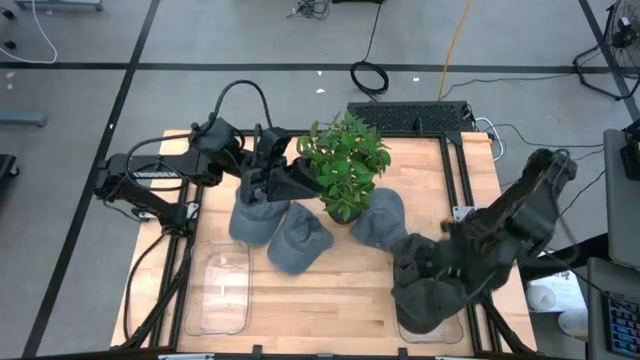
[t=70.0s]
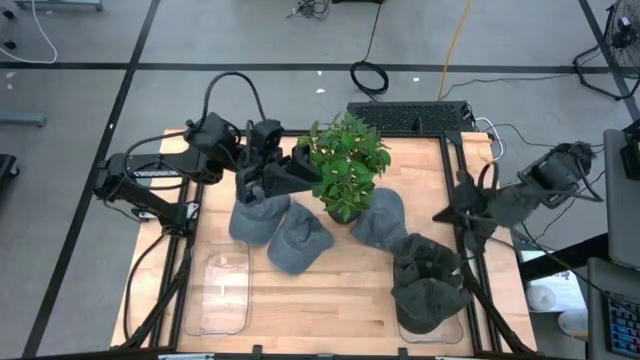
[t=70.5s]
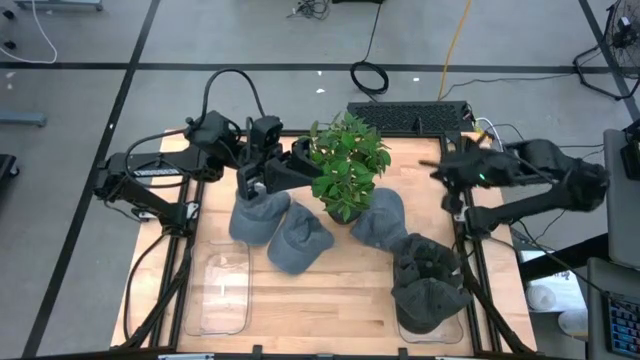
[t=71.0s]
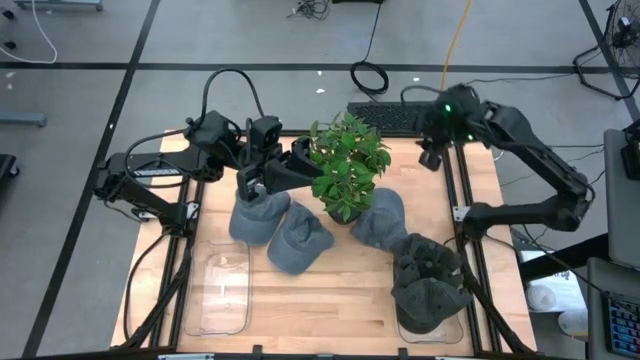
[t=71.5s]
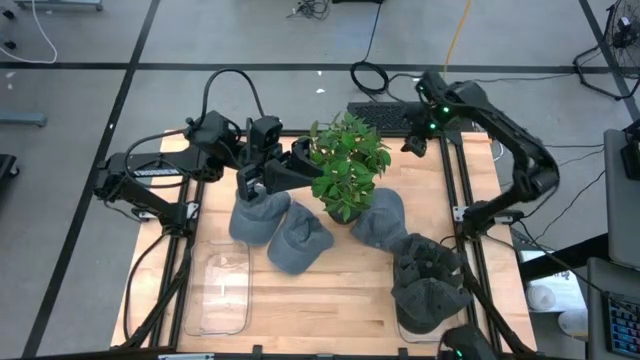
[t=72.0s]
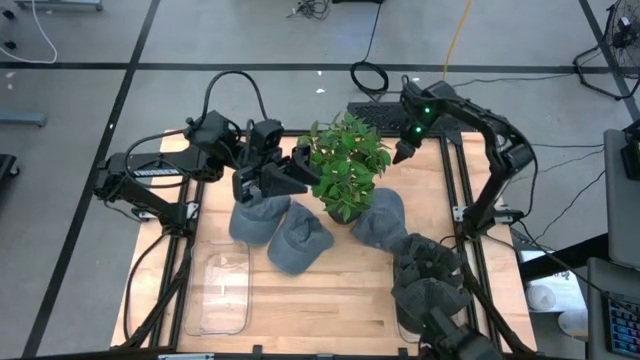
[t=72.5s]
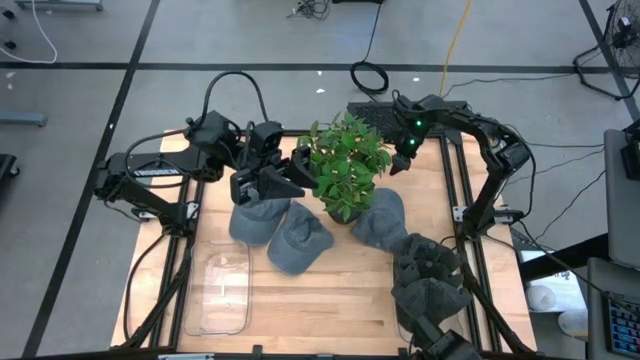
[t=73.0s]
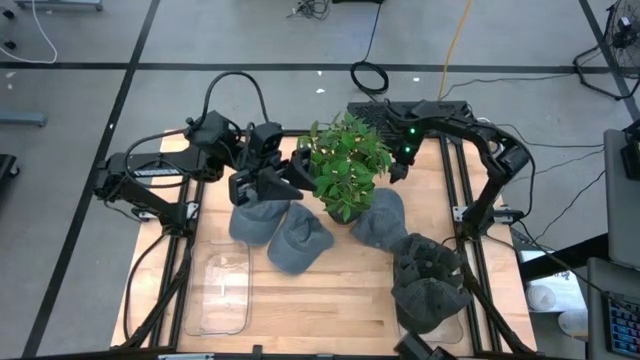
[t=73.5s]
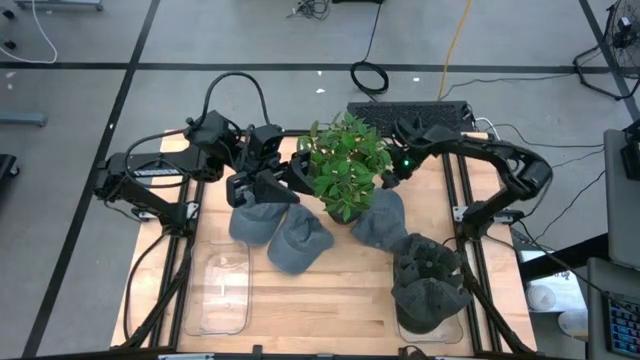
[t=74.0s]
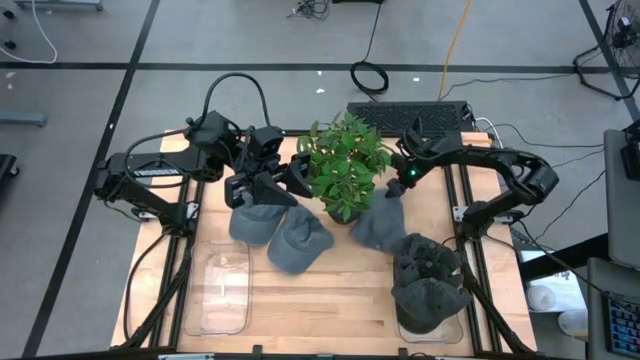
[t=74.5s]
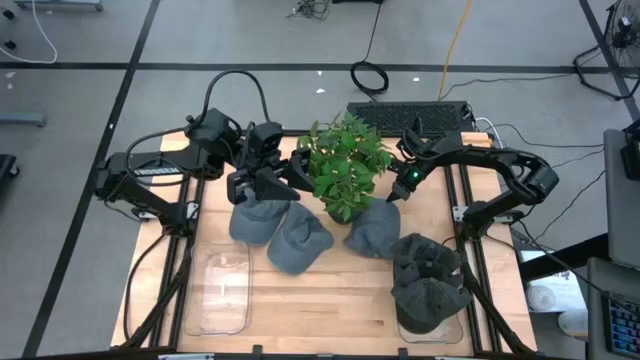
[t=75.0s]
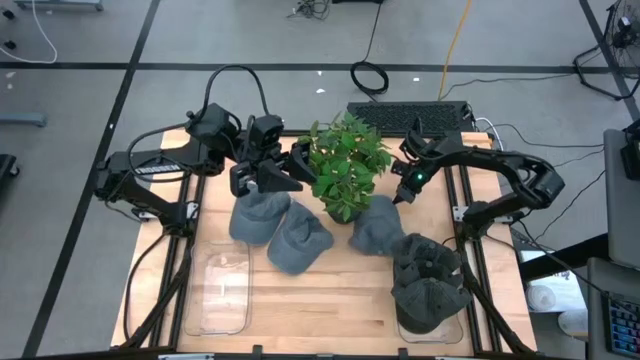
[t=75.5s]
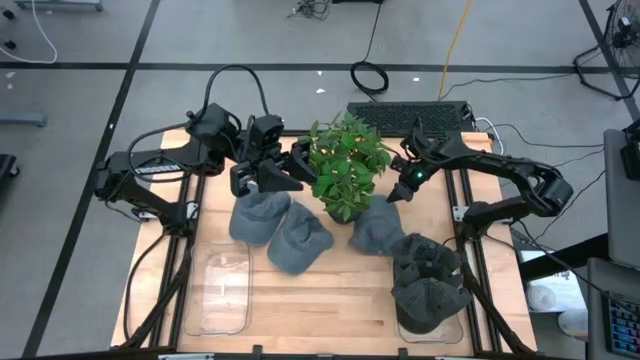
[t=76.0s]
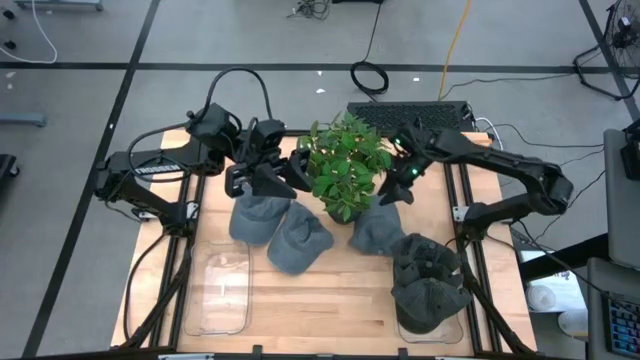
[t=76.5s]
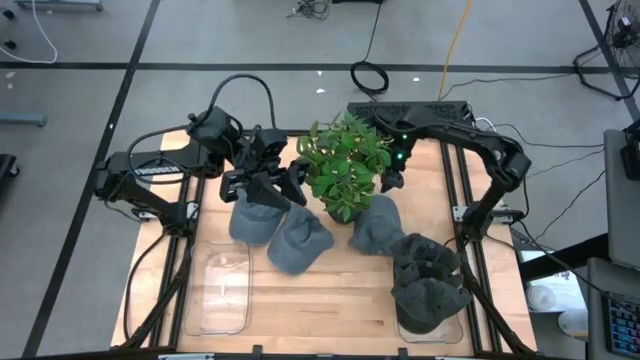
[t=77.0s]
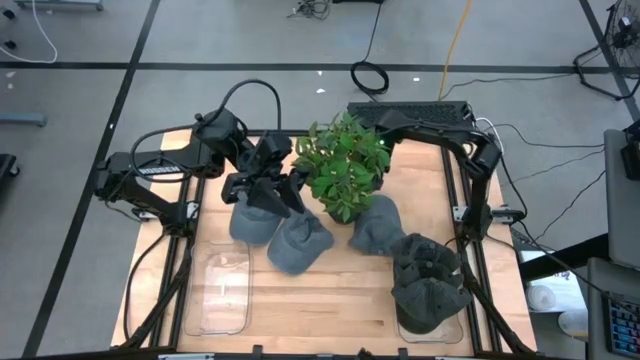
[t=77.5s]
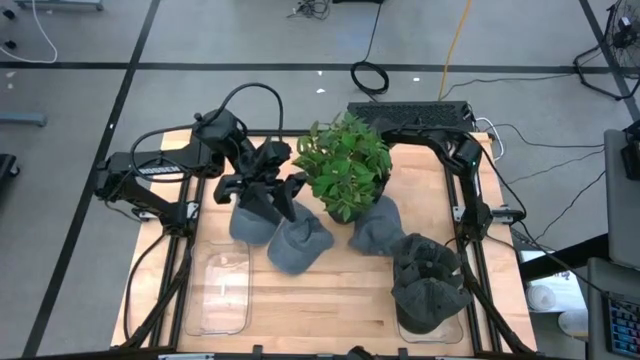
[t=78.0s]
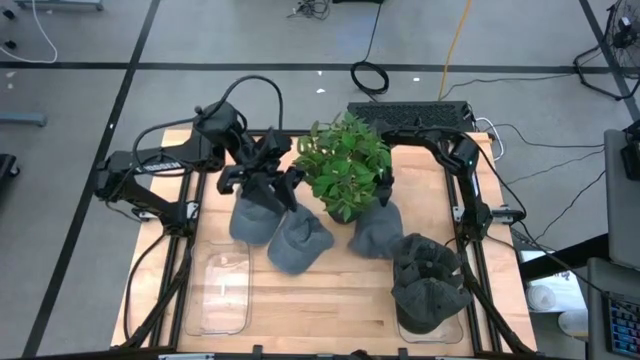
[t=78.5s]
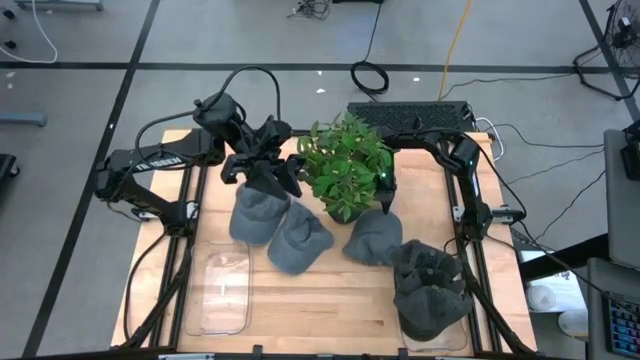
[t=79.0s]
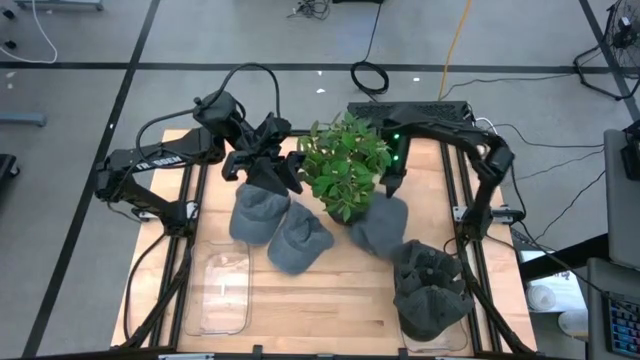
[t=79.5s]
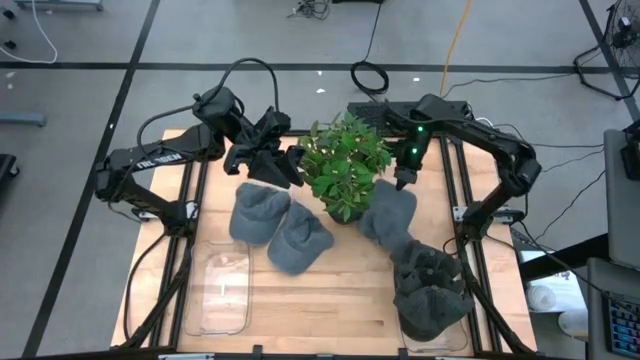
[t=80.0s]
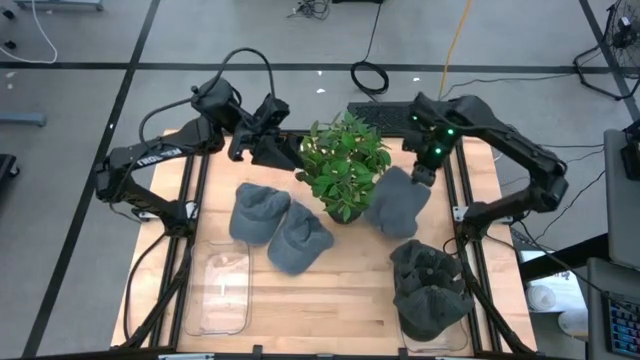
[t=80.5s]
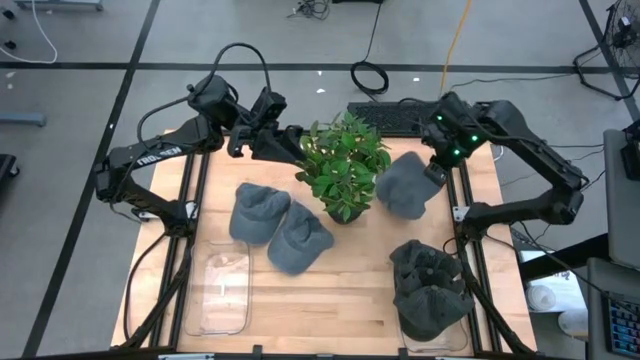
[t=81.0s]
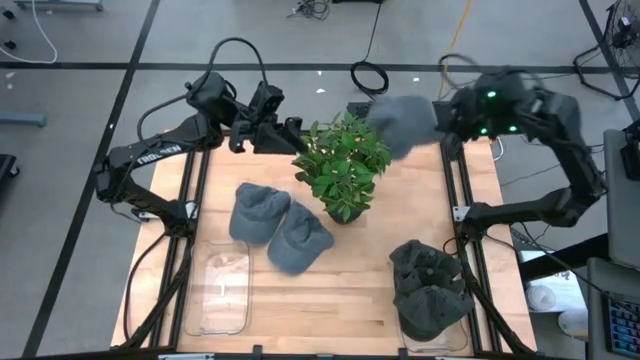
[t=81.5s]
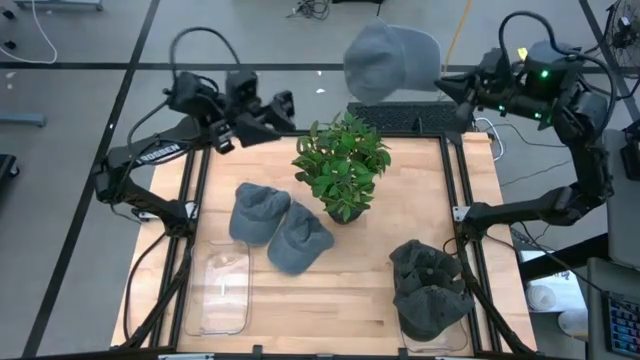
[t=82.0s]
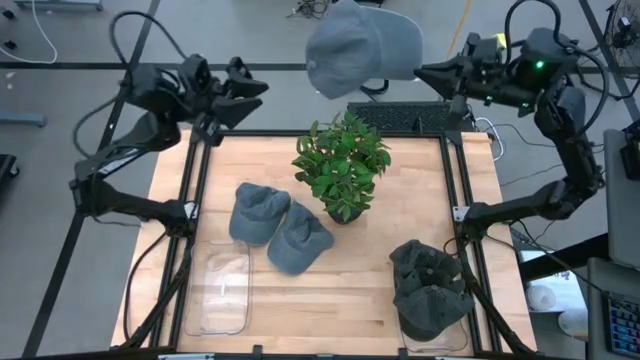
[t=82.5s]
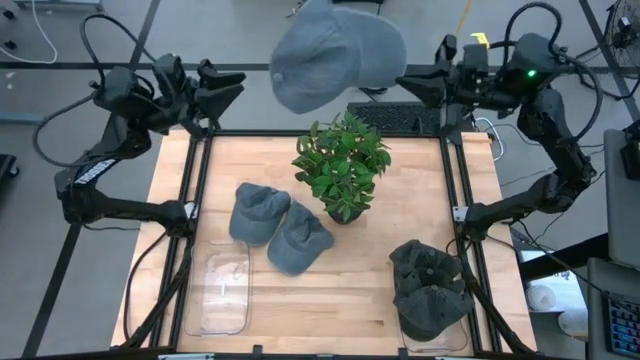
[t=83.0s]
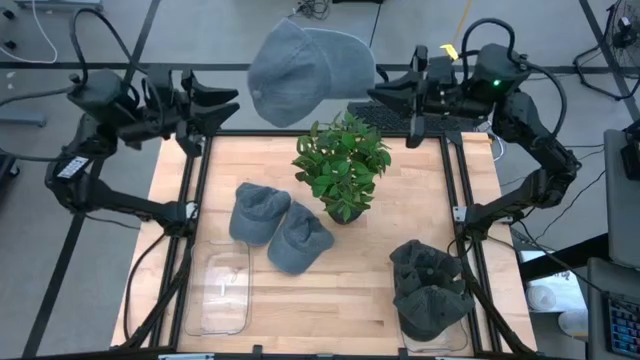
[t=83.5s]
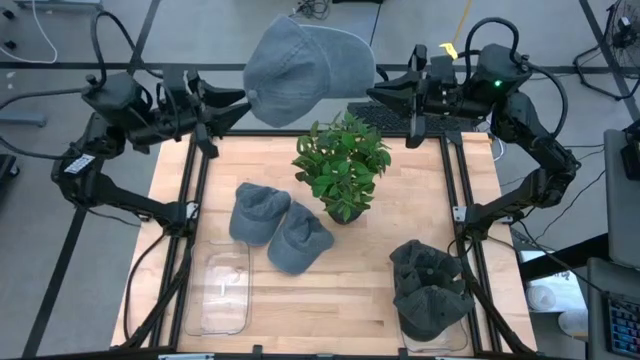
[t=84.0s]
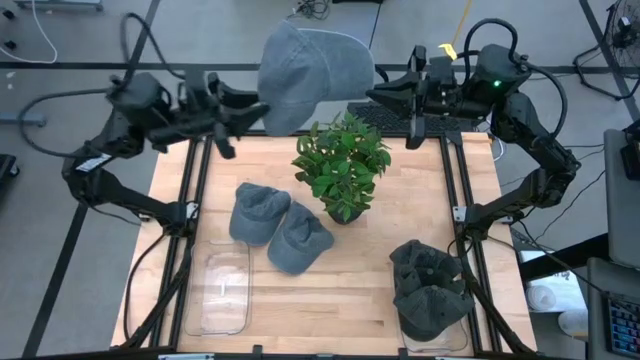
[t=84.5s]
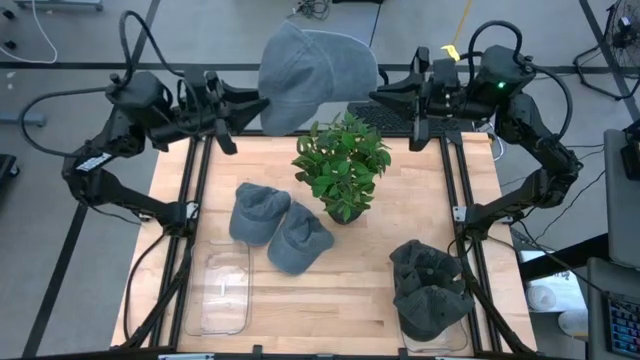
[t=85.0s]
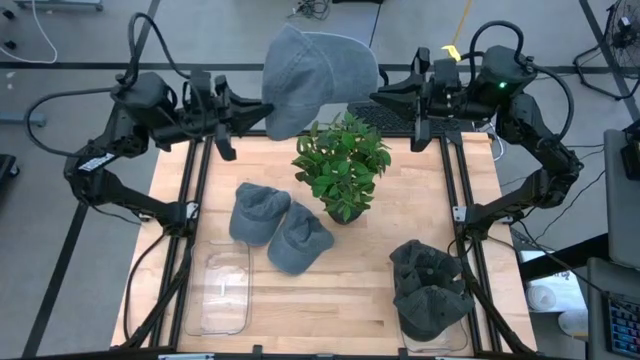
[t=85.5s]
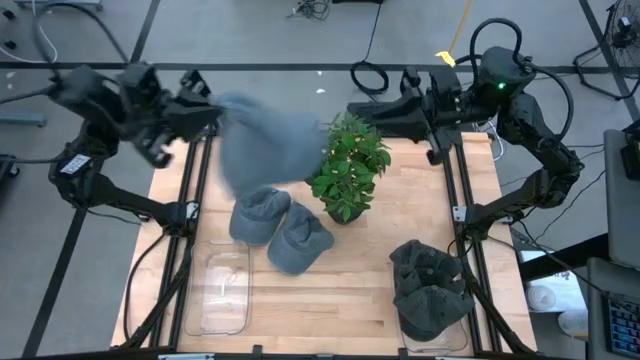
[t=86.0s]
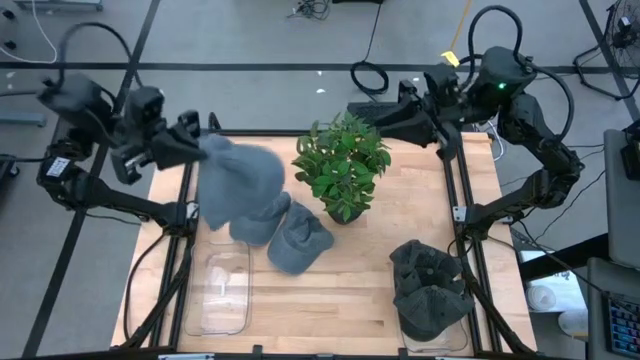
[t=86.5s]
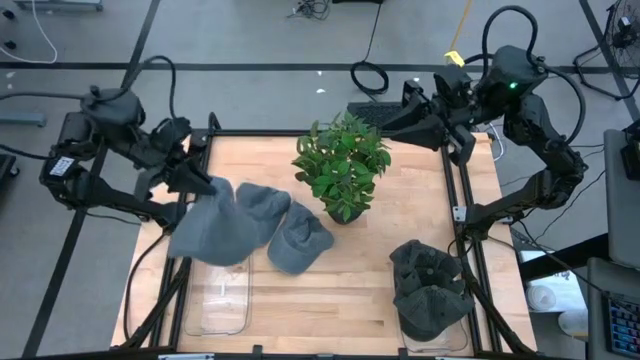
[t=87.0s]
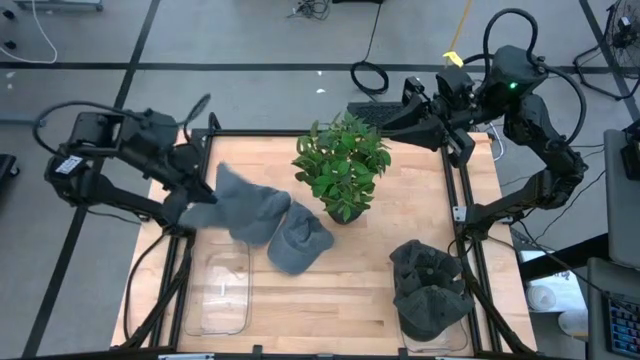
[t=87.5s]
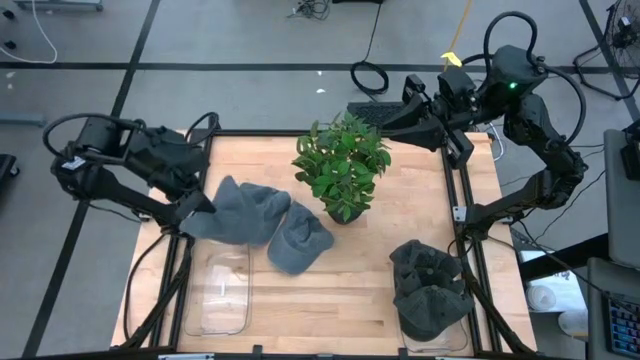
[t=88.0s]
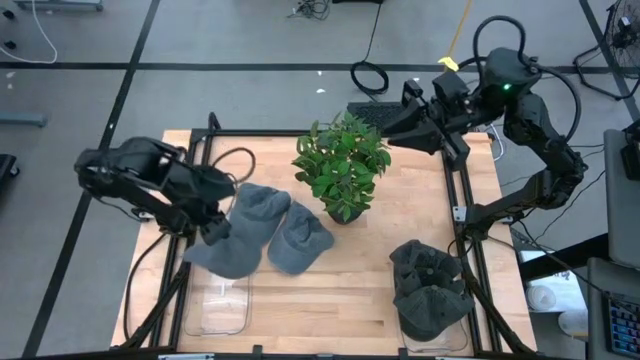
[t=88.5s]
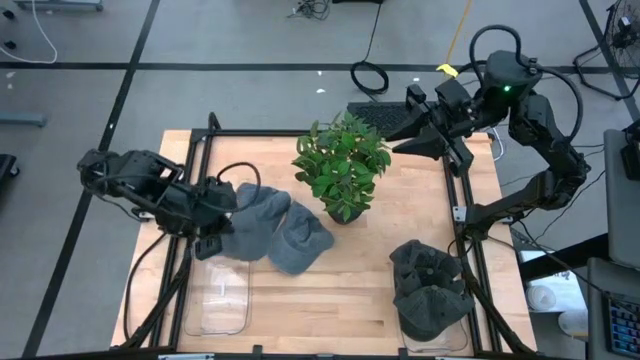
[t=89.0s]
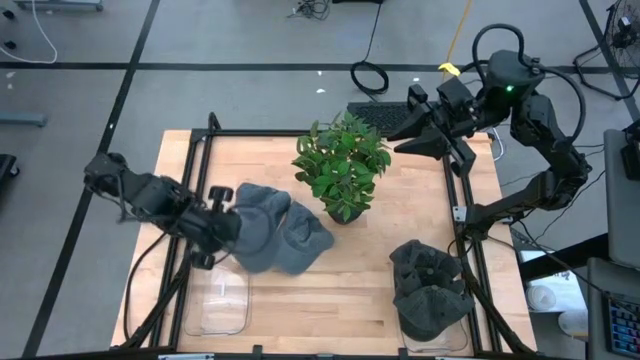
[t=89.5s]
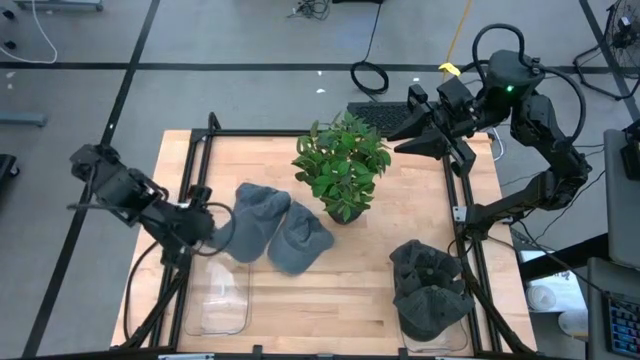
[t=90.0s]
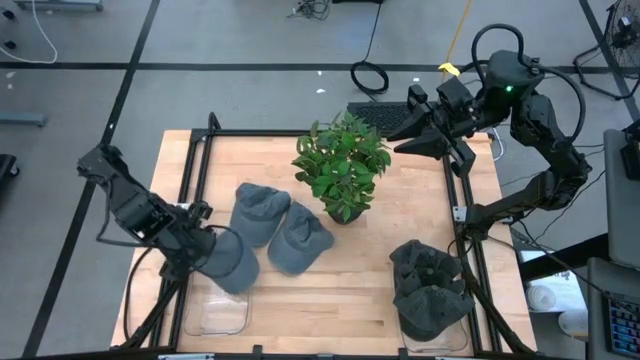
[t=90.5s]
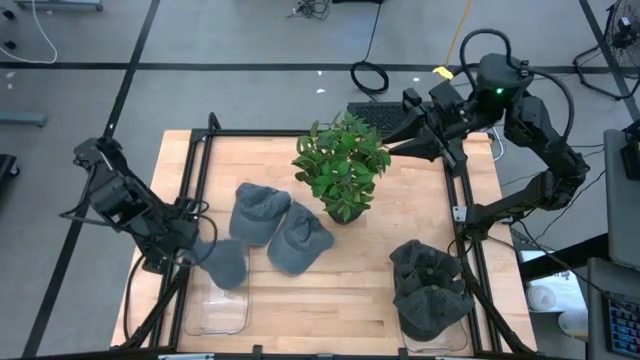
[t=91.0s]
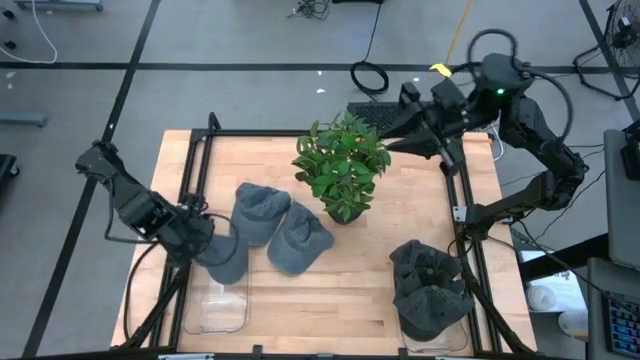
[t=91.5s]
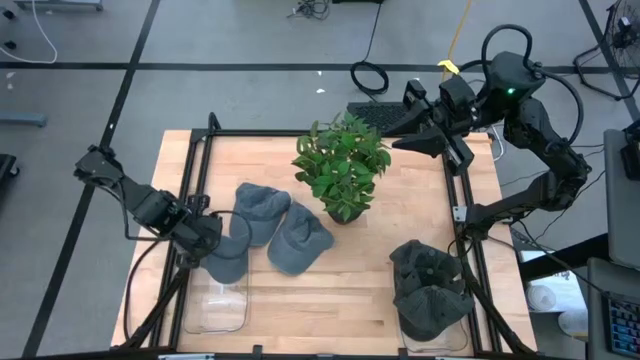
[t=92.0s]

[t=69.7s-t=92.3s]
Task: Pick & Place hat
Put the right blue cap into the left transparent bin
